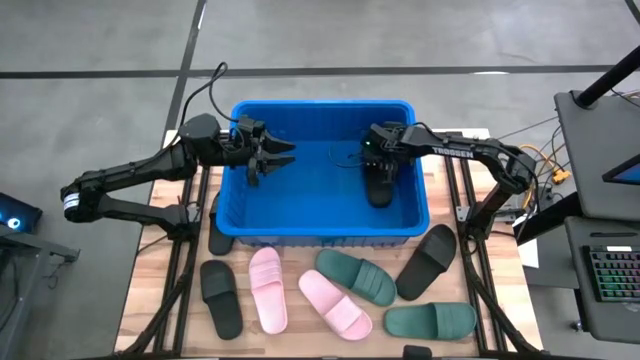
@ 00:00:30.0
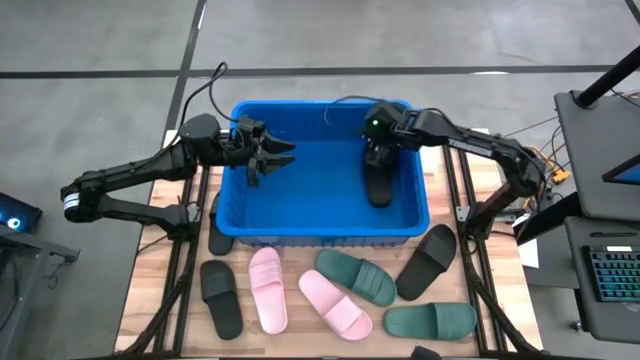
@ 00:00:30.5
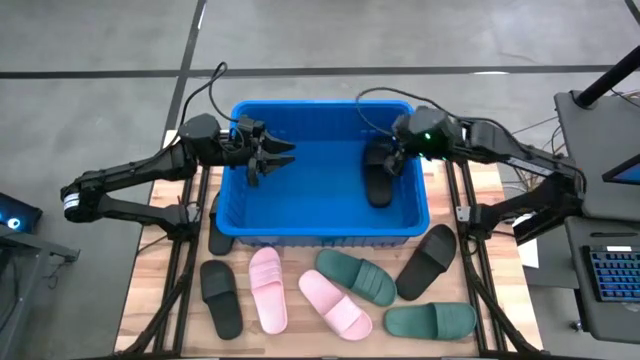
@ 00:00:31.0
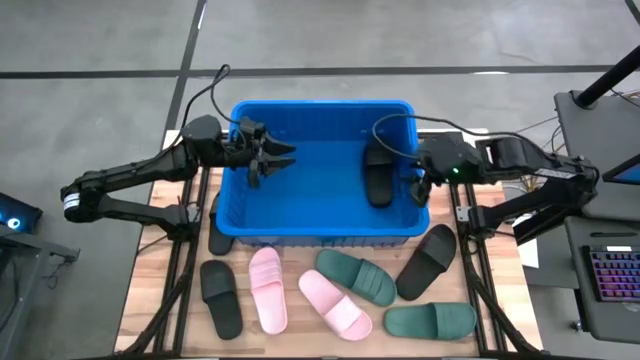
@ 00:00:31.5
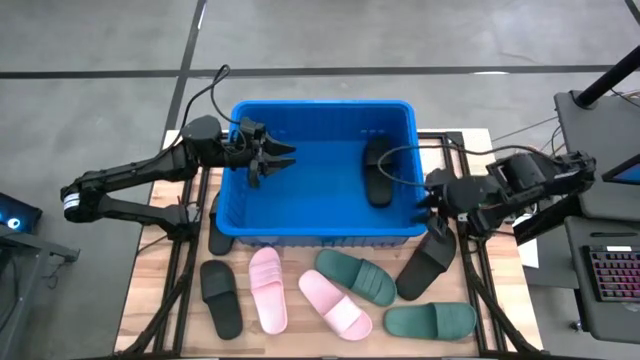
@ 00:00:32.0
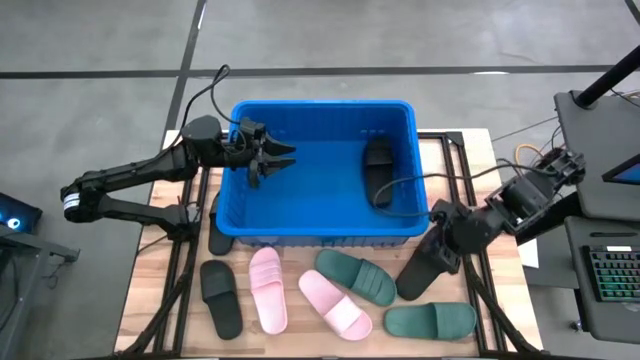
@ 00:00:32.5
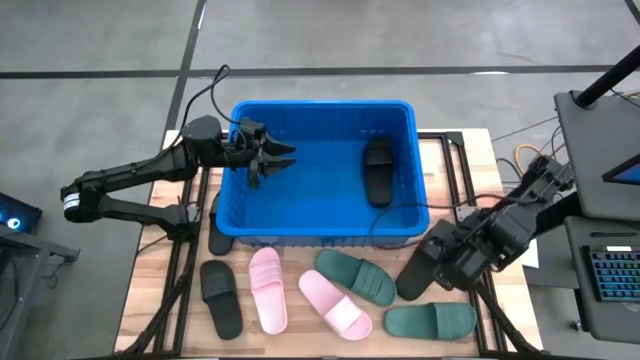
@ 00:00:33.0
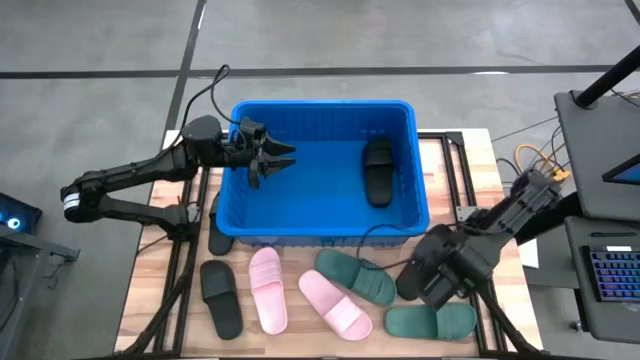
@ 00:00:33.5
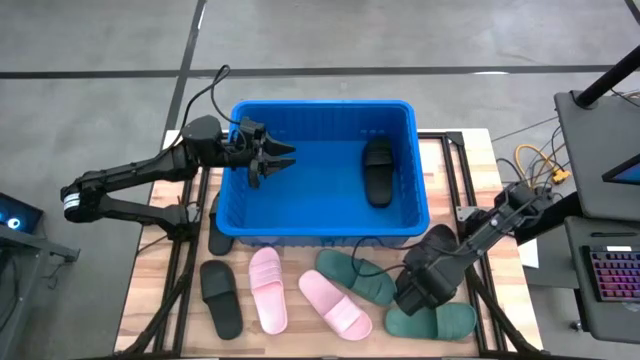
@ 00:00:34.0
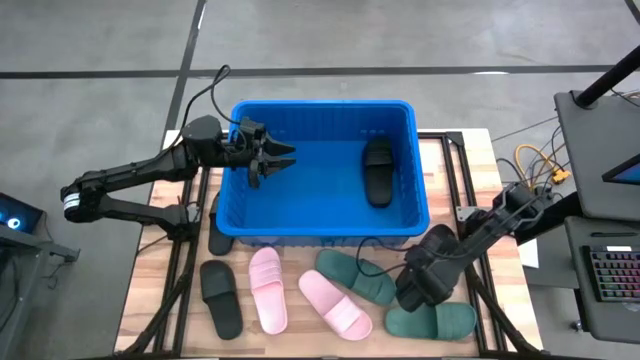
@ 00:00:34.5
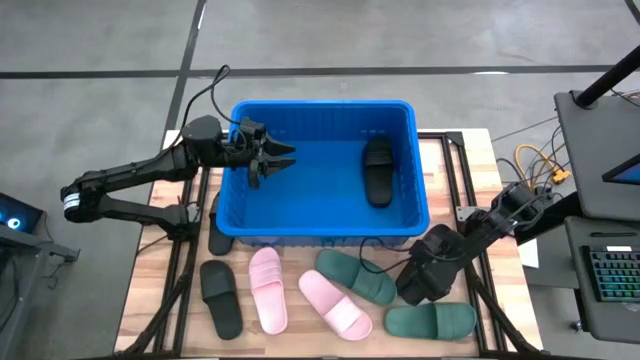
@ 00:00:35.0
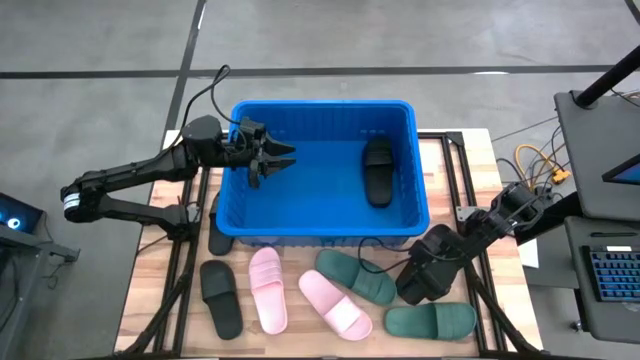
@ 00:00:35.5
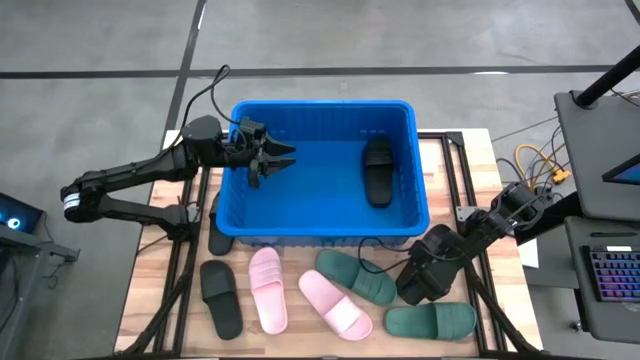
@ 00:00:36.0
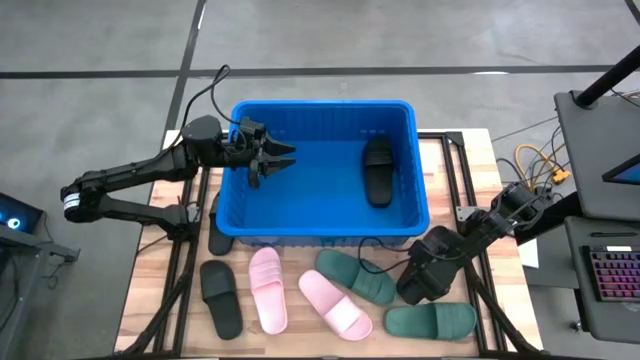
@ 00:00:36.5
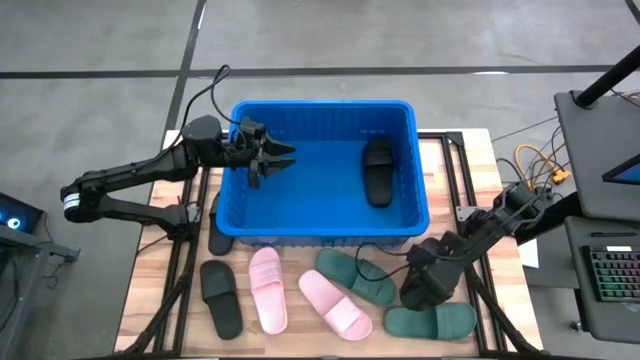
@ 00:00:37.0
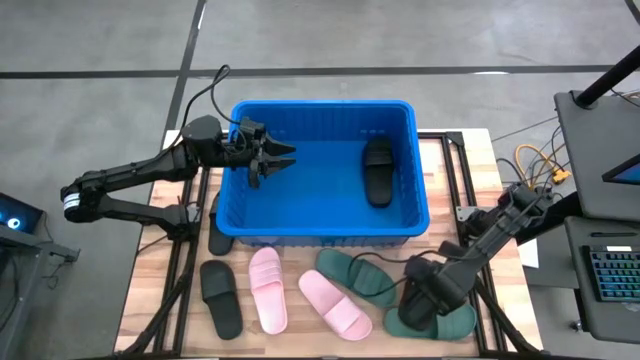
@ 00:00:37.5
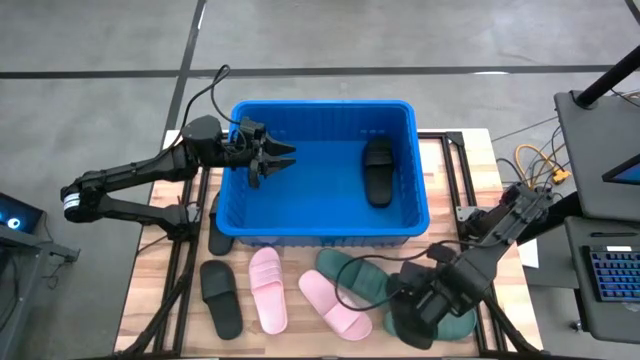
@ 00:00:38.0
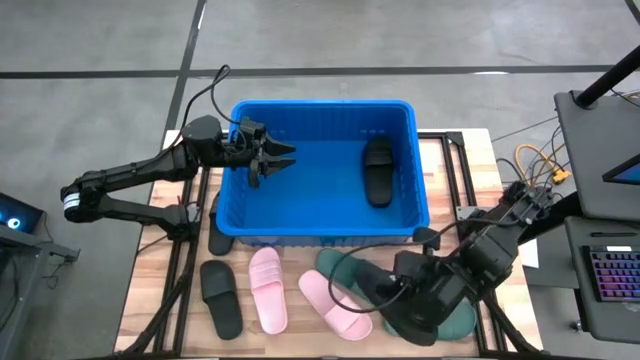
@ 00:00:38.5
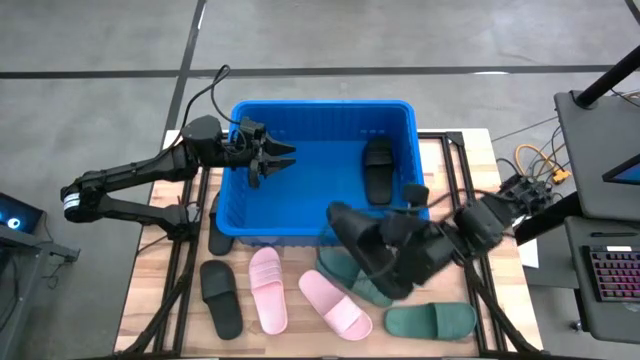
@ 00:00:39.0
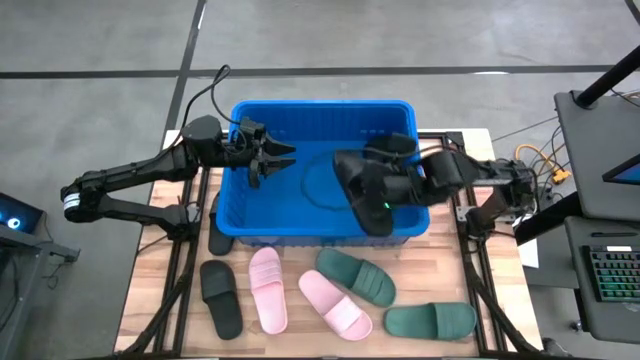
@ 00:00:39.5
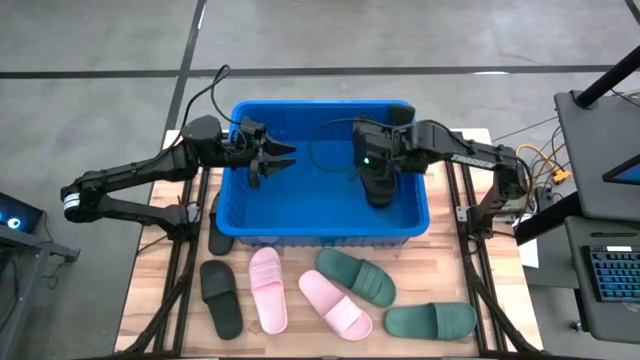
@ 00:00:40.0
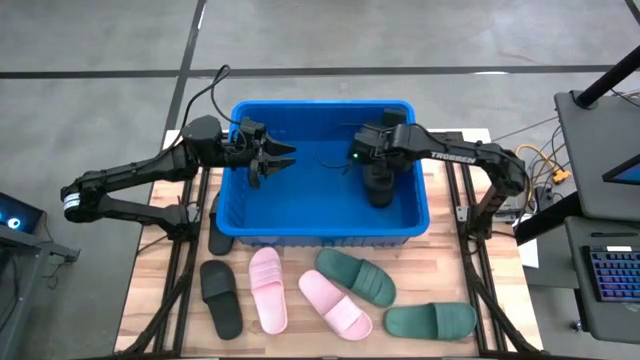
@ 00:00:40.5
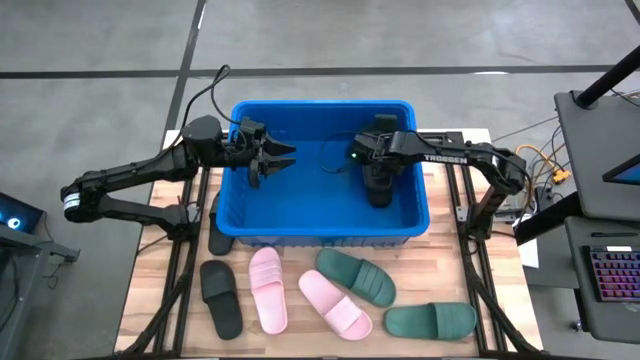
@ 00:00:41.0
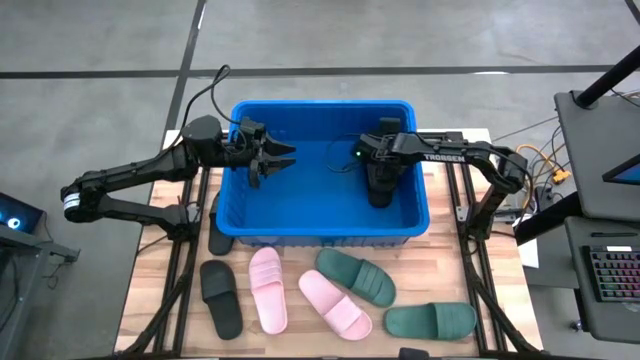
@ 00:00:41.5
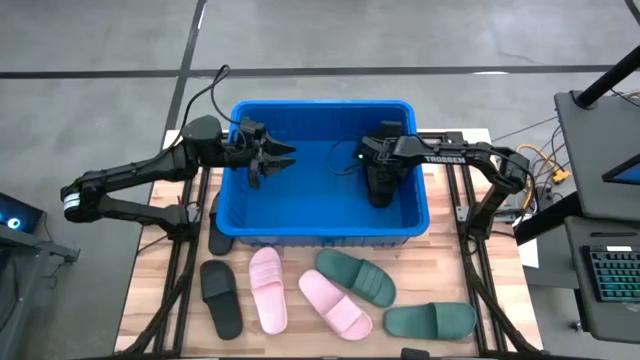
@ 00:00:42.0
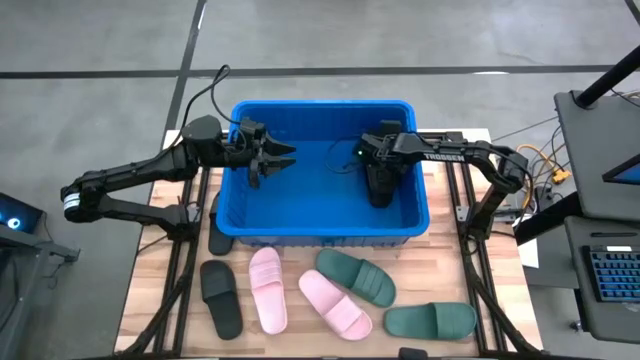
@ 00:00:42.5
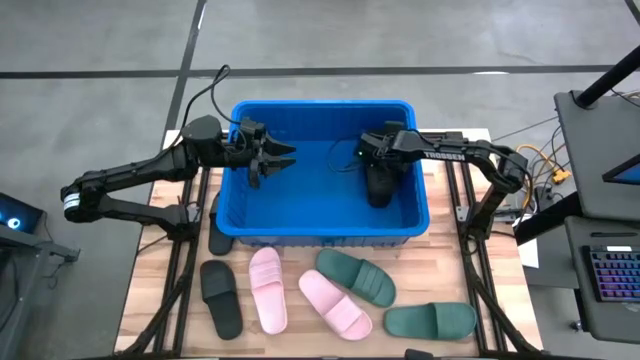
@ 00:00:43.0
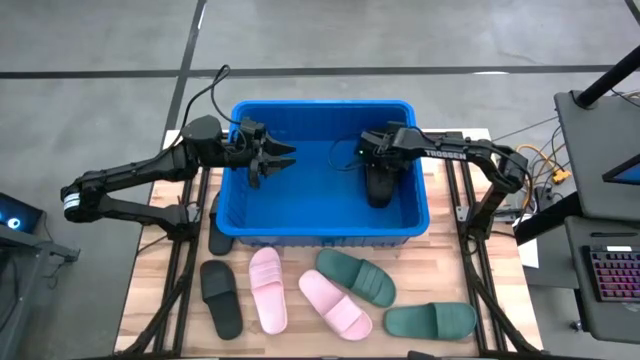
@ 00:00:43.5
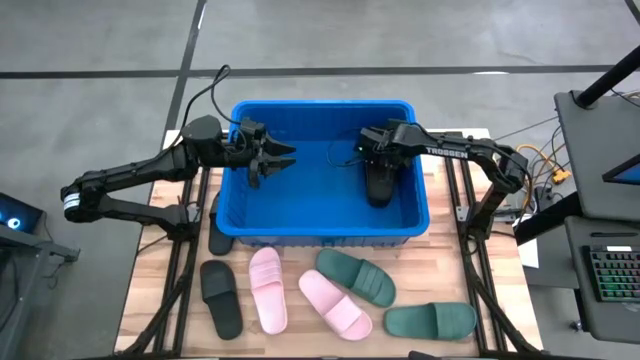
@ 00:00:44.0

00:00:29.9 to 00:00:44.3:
Task: Pick and place slides into bin
Put the black slide into the blue bin

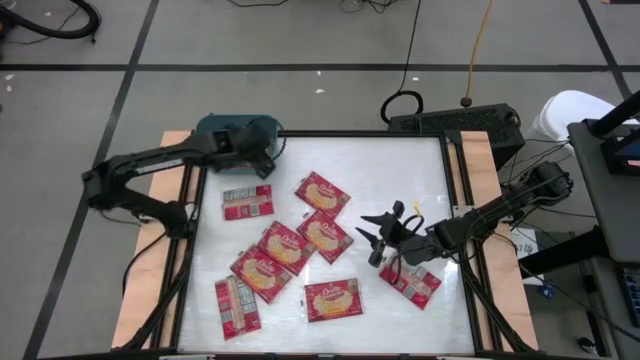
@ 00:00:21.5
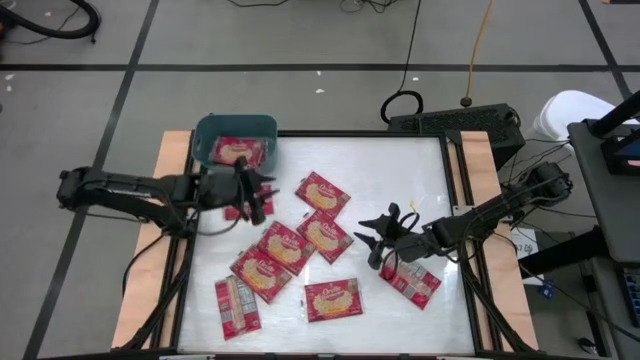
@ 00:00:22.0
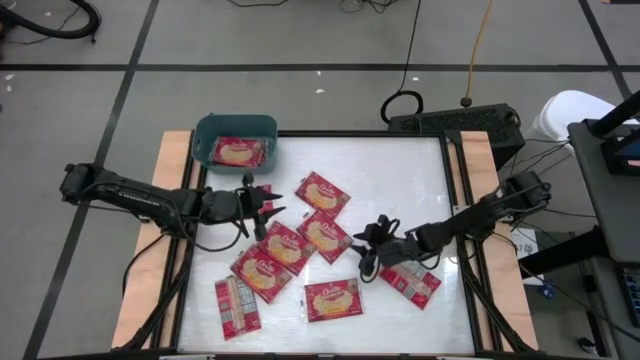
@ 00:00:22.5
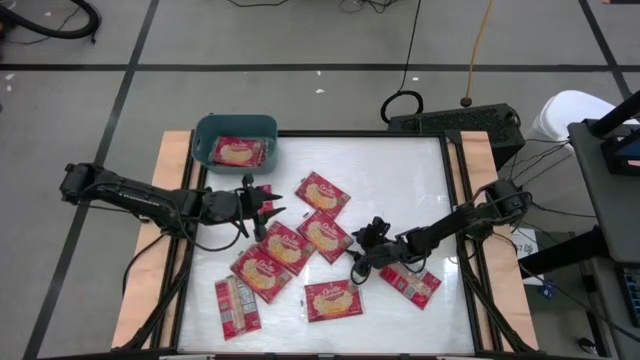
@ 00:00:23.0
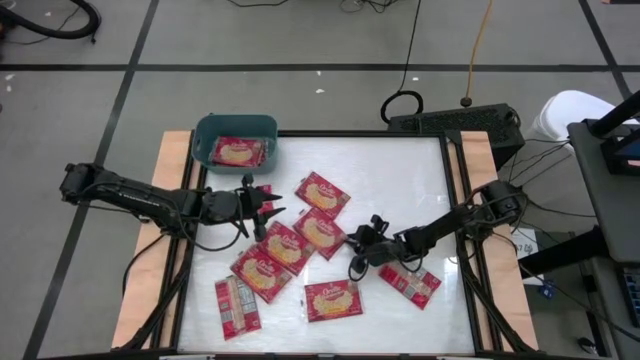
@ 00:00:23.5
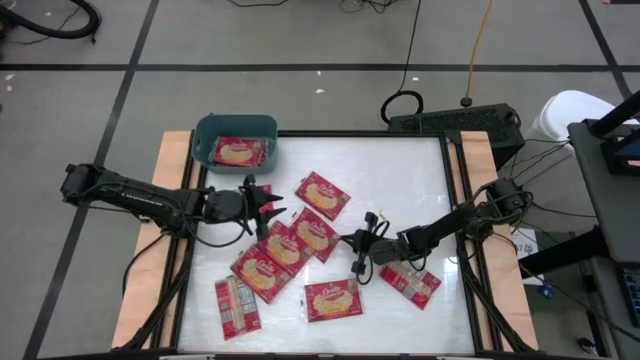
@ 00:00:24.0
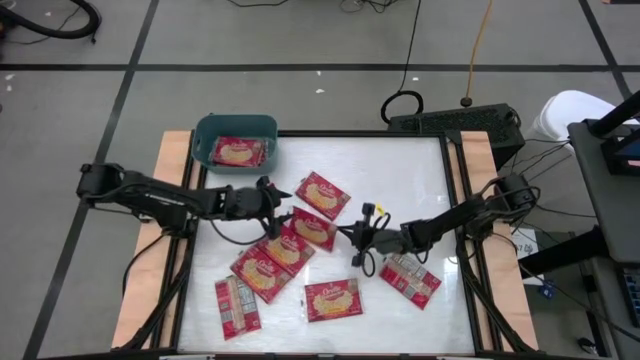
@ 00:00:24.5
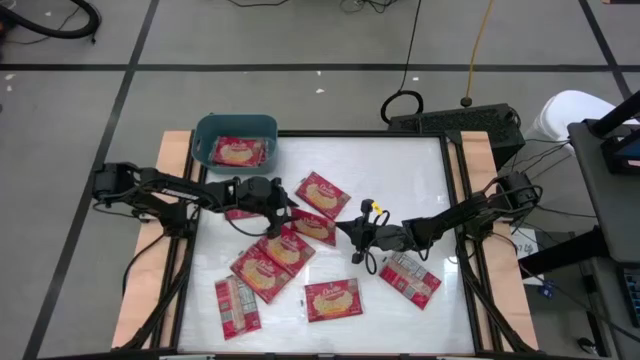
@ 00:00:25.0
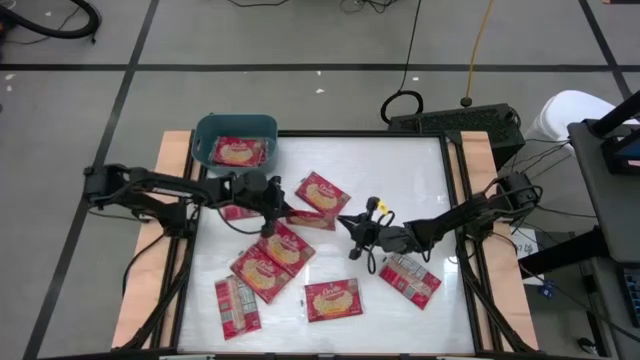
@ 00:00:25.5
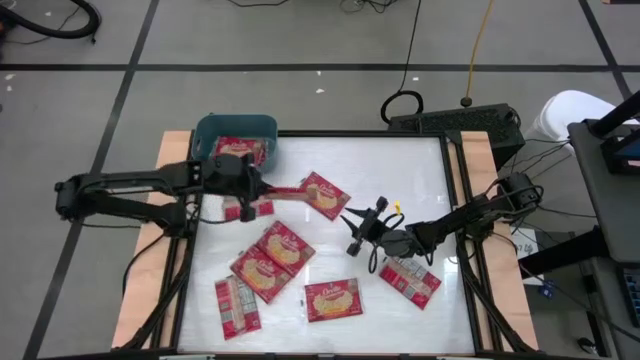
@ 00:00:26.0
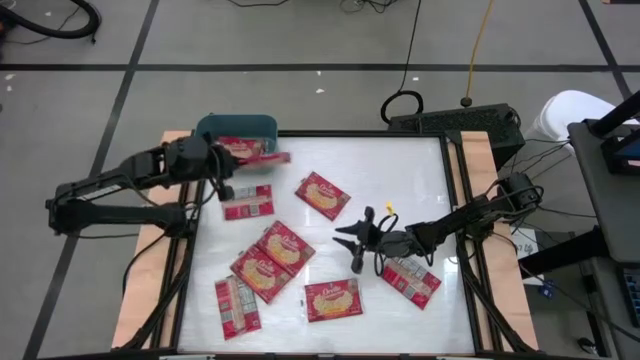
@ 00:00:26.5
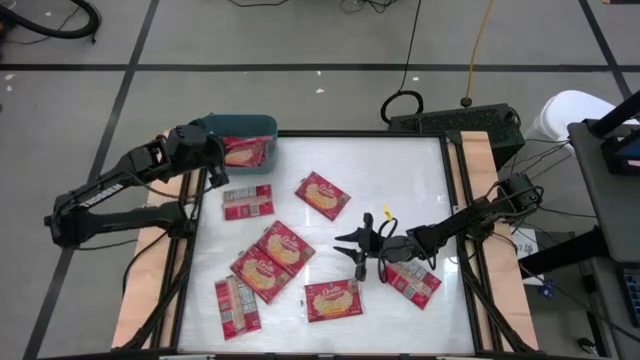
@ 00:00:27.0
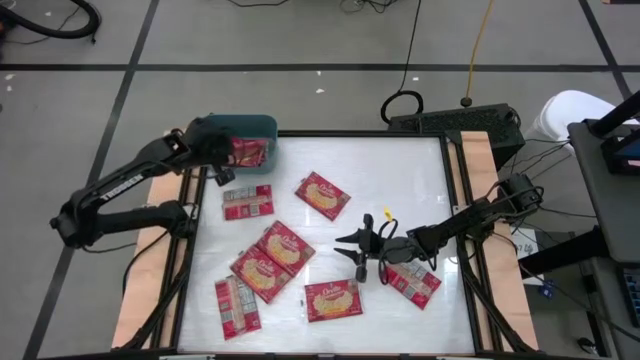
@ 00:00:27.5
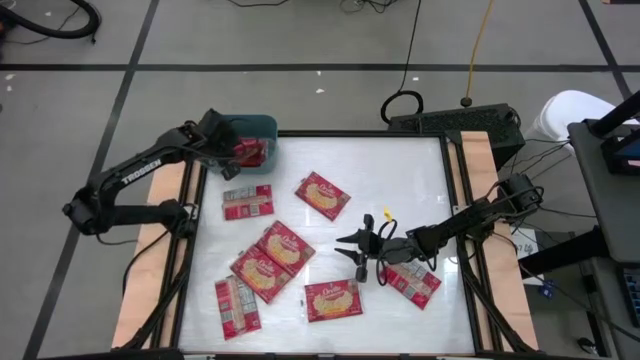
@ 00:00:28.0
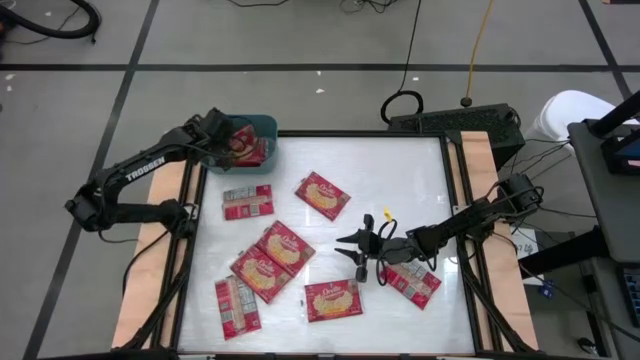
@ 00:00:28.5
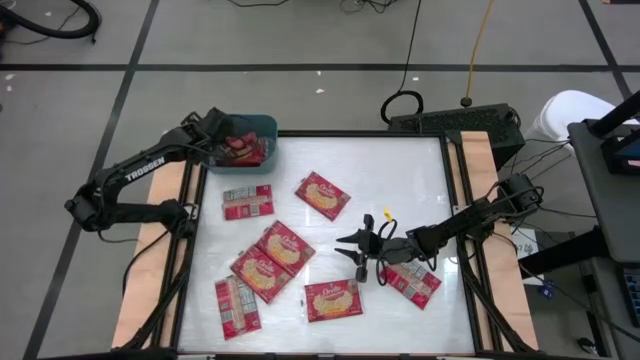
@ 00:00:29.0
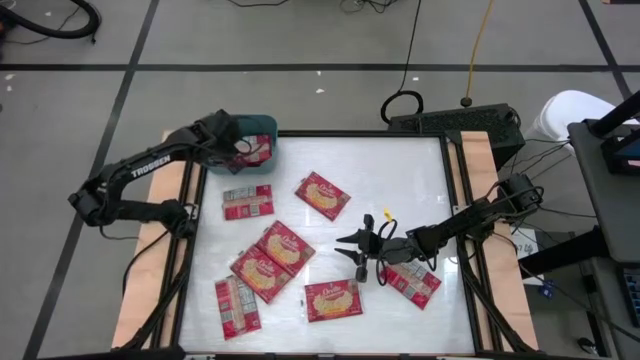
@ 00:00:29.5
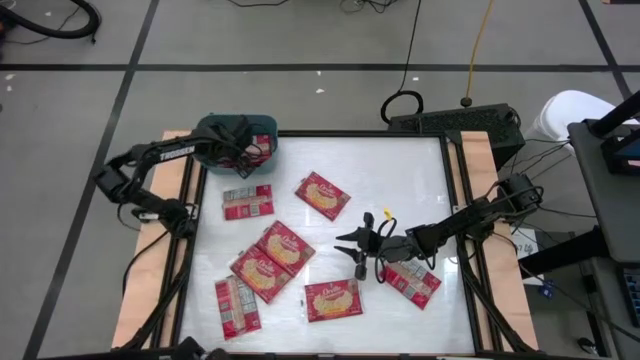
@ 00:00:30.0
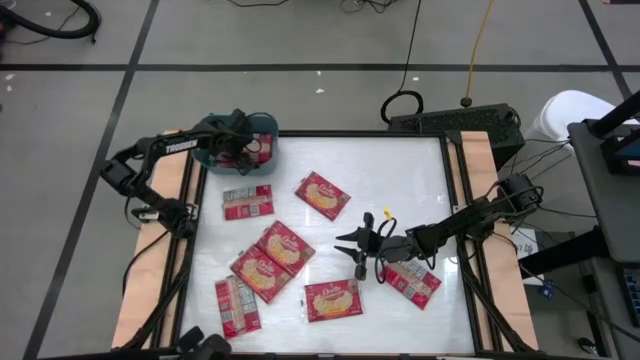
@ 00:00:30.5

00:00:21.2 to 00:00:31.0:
Task: Sort popcorn bags into baskets
Put the red popcorn bag into the blue bin
